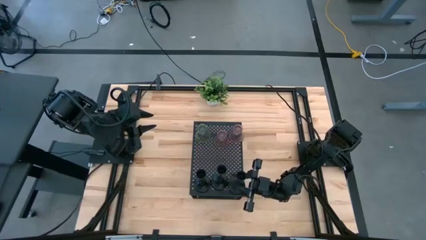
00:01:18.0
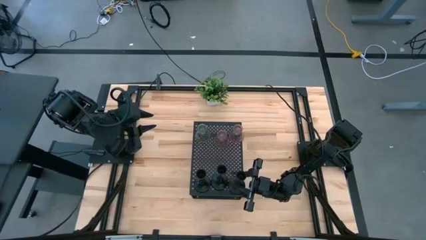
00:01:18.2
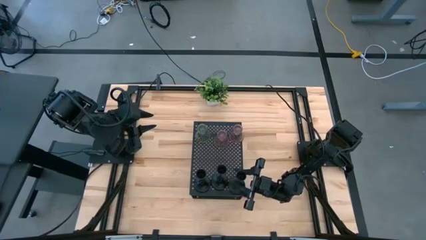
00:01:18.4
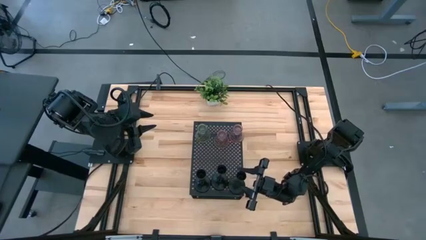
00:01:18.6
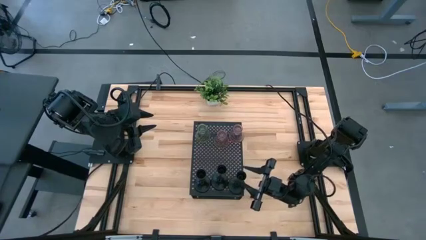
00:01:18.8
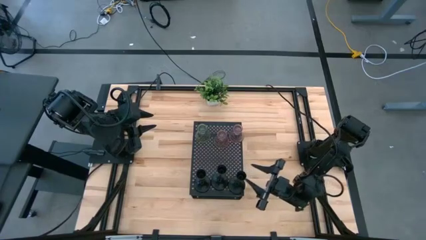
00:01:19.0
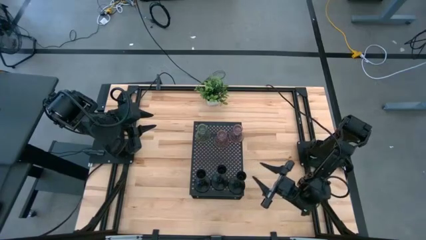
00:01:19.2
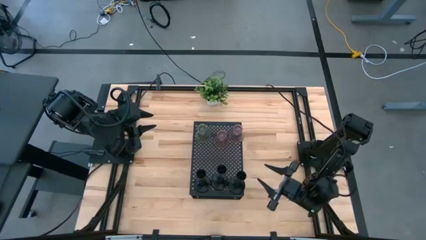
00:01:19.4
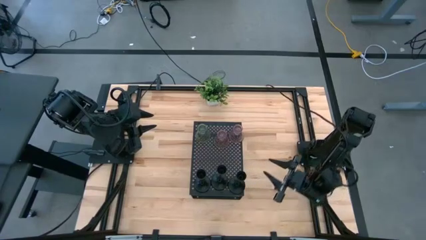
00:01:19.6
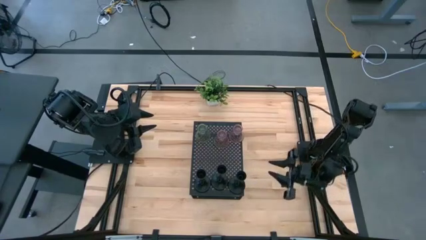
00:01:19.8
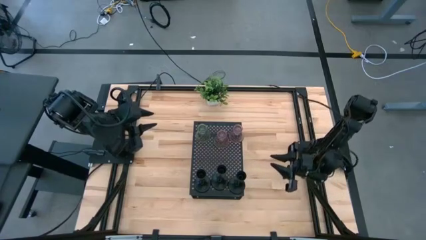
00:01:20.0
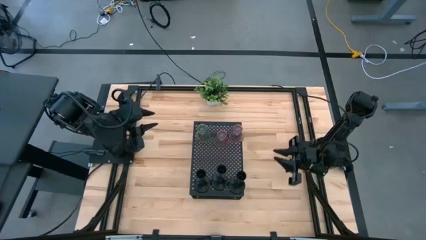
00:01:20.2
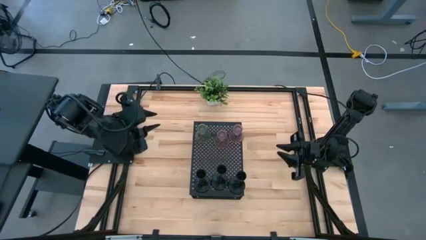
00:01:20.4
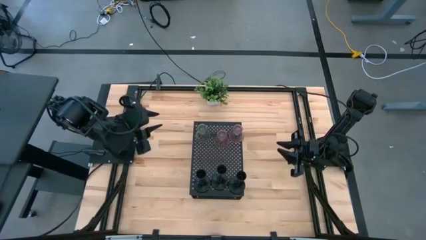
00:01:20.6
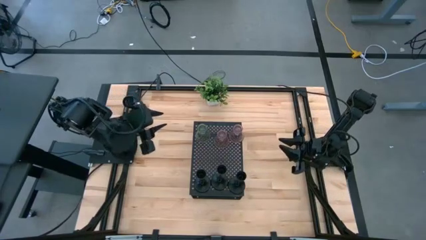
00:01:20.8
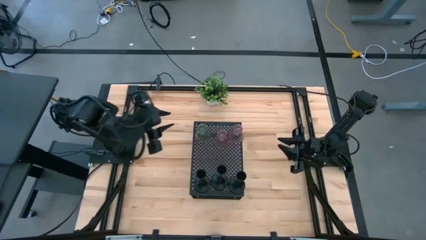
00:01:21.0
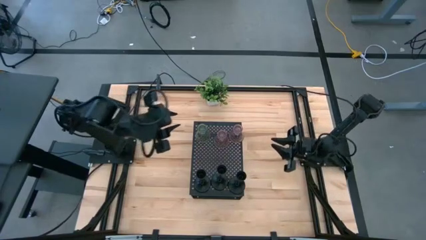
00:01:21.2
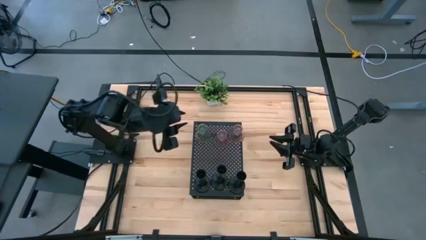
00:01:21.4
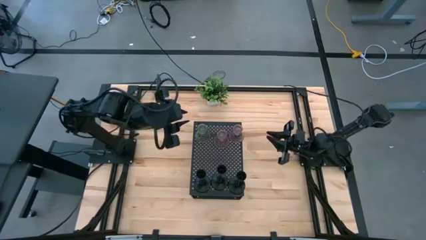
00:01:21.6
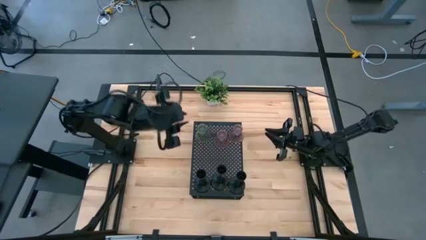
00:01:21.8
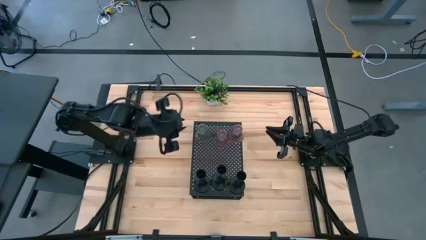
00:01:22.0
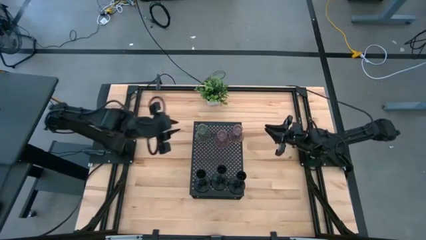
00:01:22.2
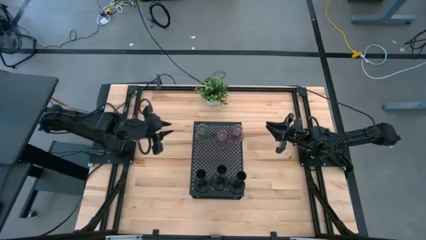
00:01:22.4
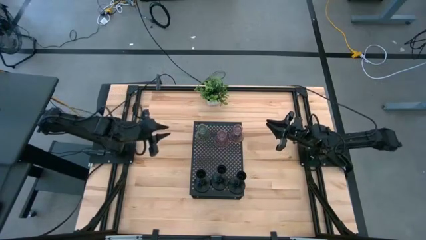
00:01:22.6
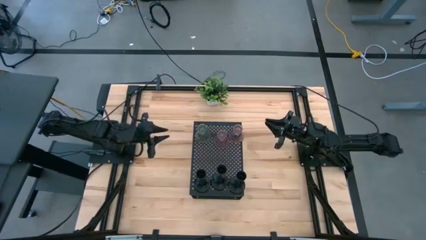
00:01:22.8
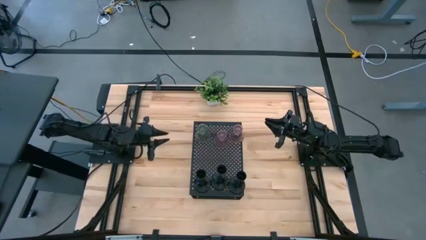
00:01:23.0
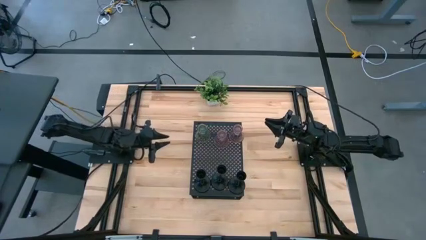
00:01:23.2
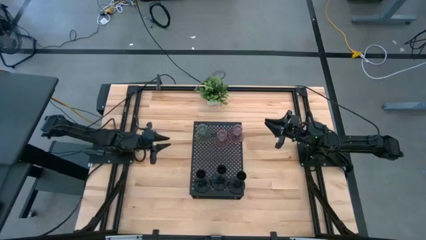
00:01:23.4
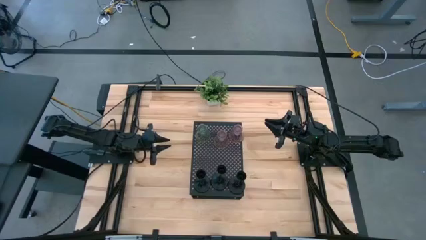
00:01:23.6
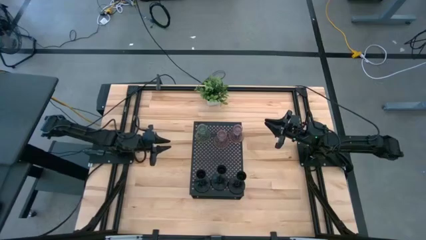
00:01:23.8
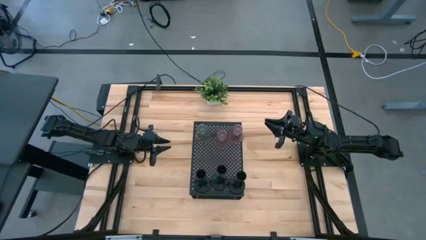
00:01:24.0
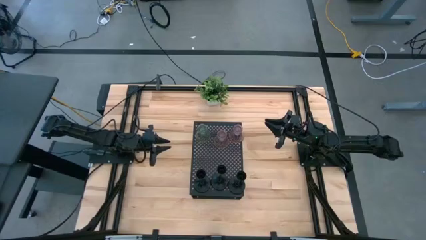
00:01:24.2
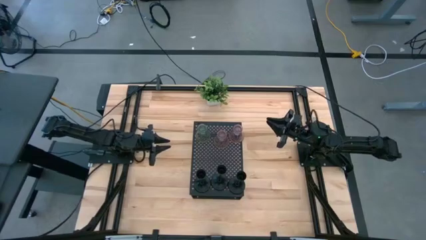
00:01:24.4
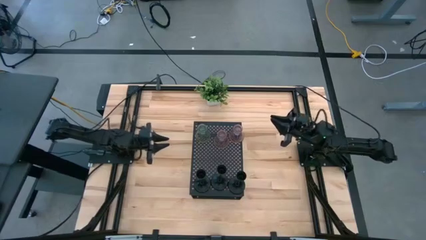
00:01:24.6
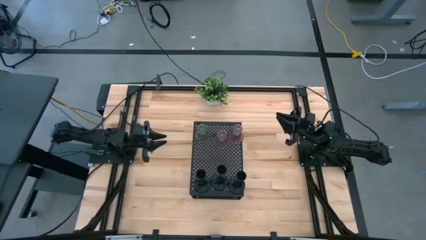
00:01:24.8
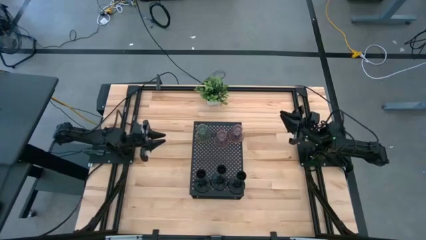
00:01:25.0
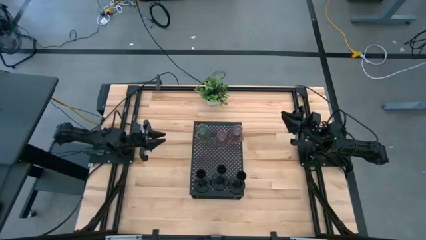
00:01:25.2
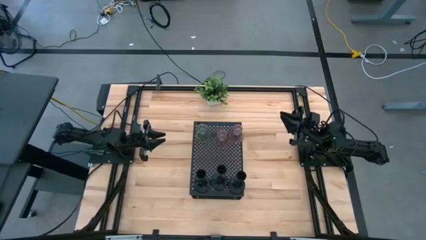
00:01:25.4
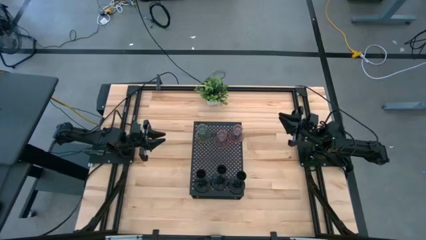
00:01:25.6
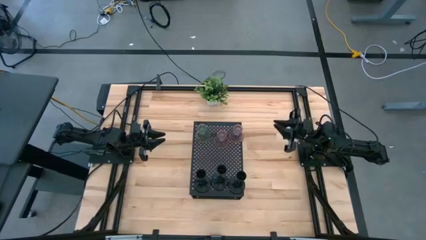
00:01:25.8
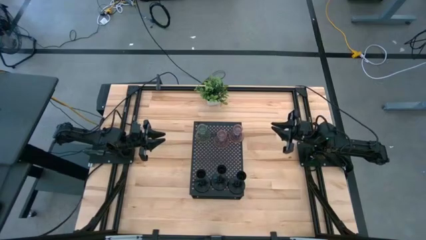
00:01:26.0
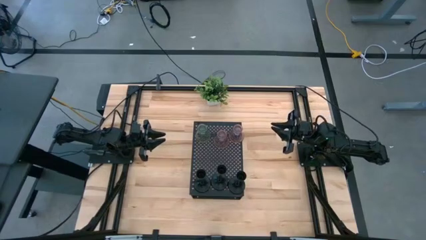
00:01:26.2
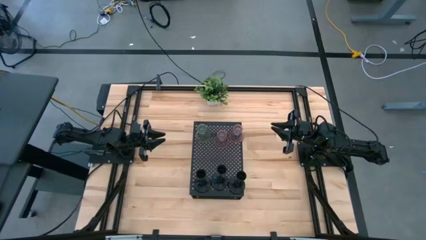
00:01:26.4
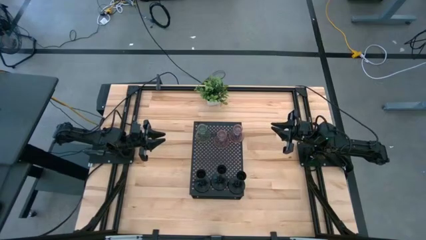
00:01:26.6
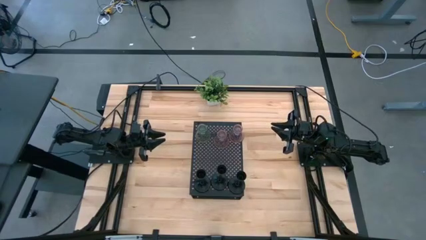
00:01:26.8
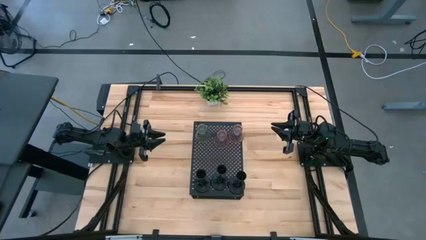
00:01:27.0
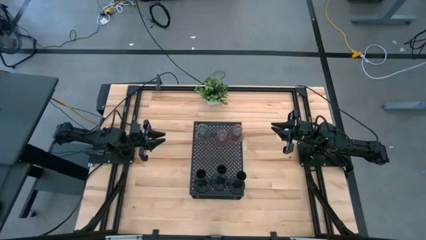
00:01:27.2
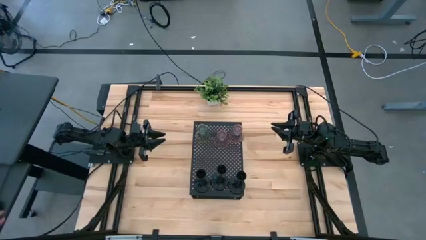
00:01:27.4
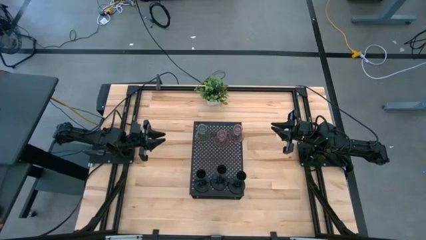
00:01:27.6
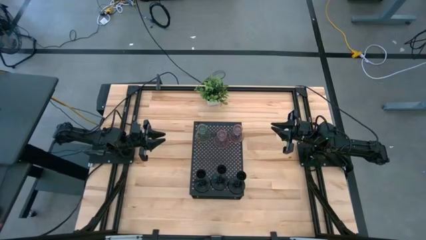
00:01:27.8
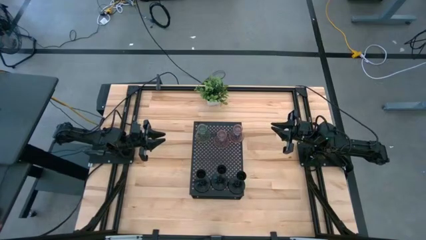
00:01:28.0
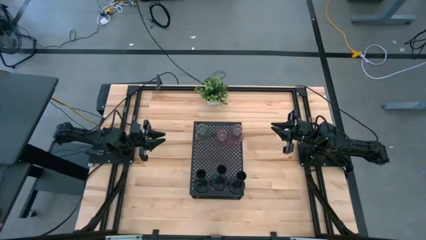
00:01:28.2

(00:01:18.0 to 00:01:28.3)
Task: Pick & Place candle stick holders
Return to Home Position

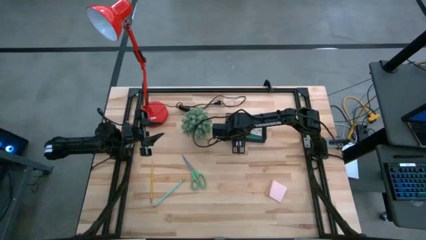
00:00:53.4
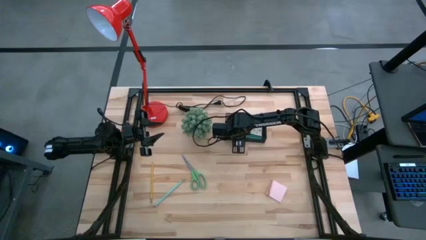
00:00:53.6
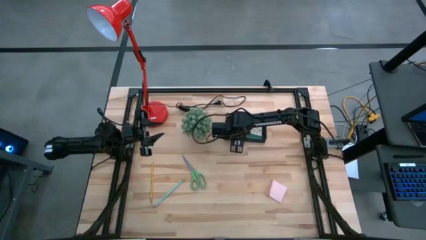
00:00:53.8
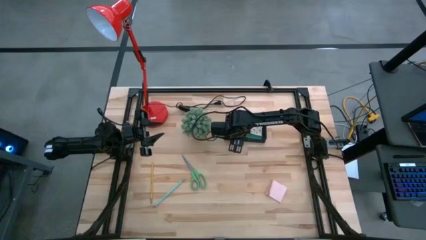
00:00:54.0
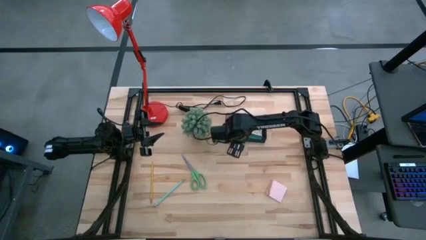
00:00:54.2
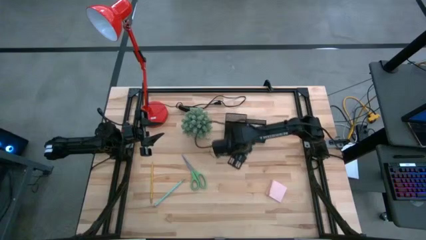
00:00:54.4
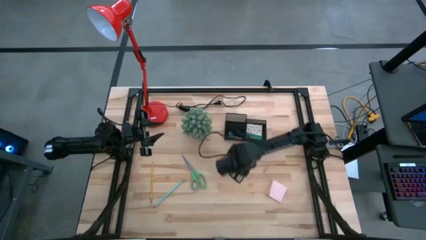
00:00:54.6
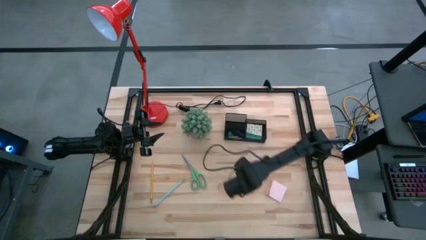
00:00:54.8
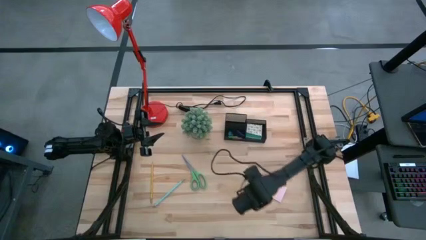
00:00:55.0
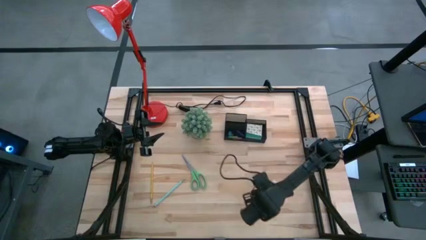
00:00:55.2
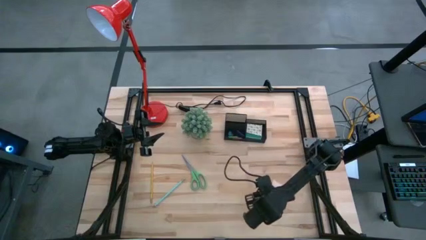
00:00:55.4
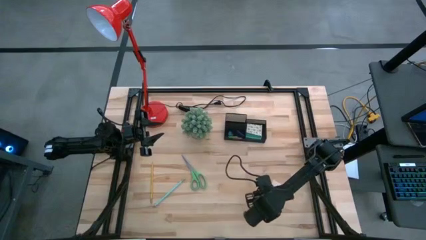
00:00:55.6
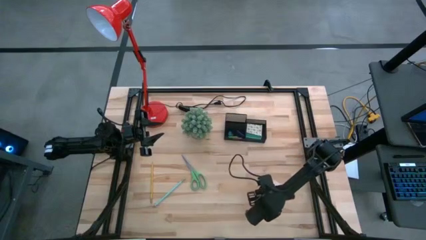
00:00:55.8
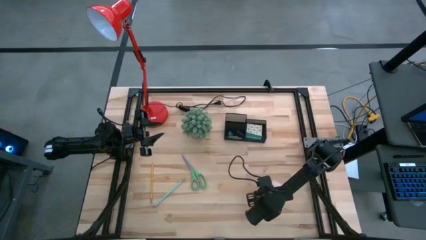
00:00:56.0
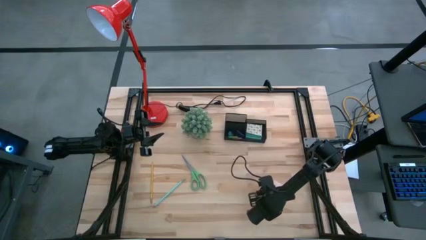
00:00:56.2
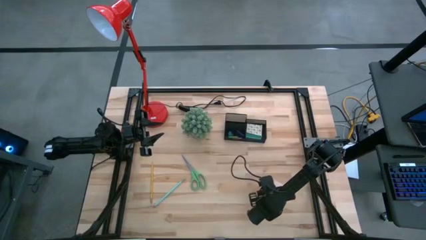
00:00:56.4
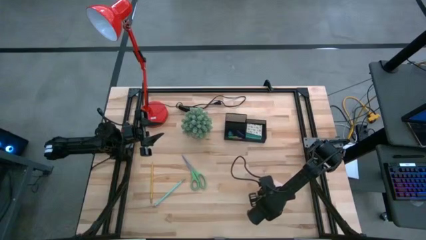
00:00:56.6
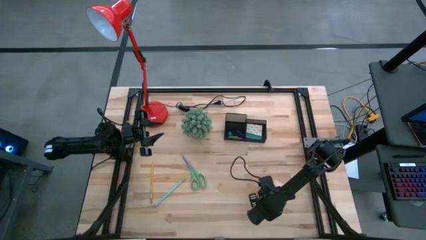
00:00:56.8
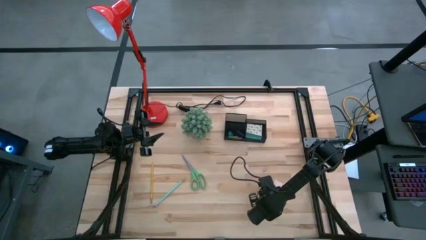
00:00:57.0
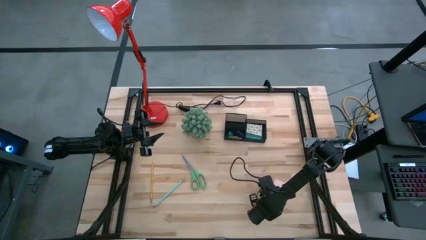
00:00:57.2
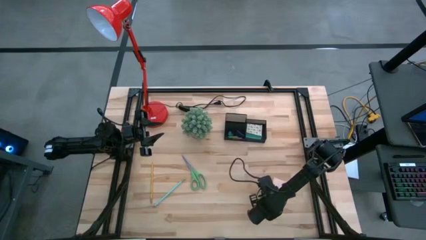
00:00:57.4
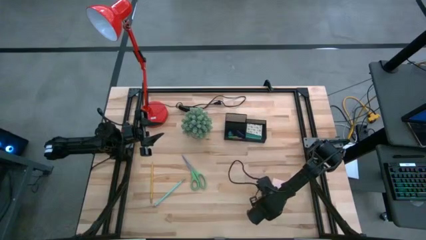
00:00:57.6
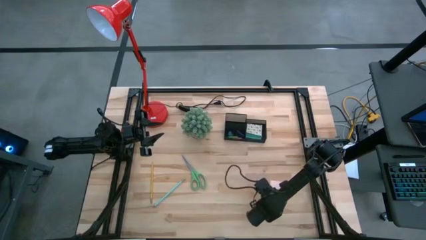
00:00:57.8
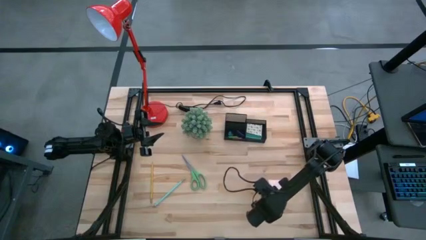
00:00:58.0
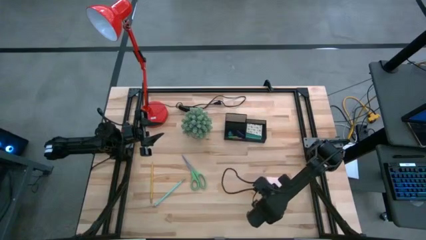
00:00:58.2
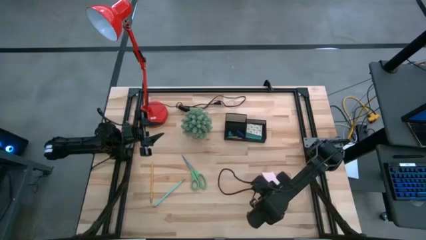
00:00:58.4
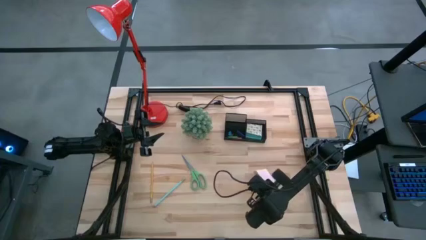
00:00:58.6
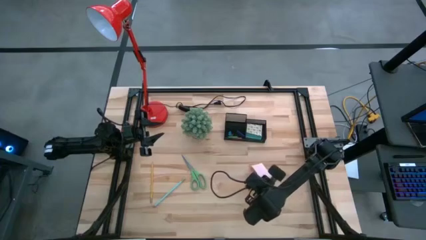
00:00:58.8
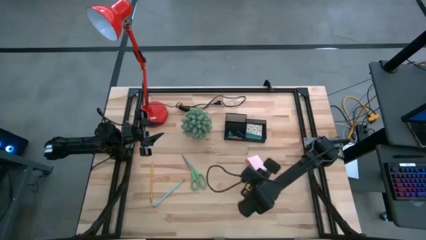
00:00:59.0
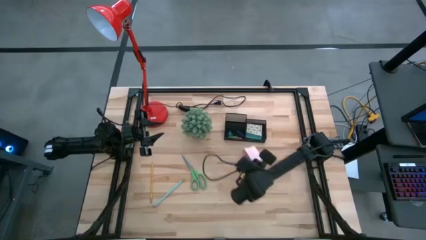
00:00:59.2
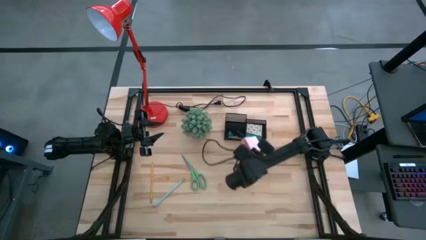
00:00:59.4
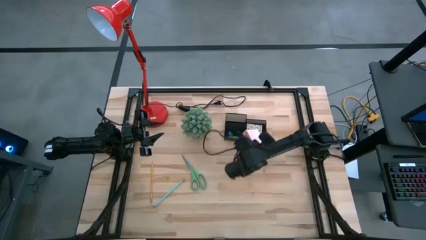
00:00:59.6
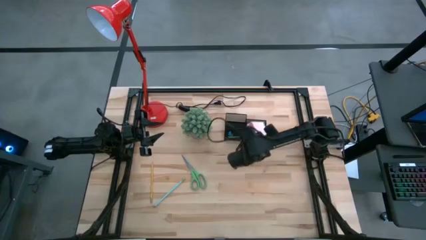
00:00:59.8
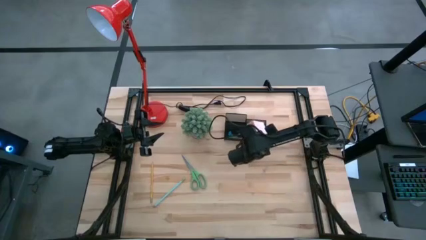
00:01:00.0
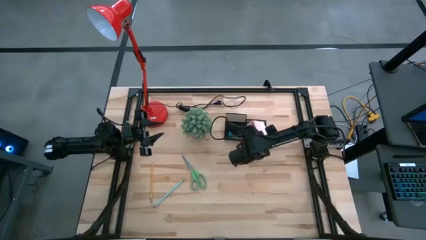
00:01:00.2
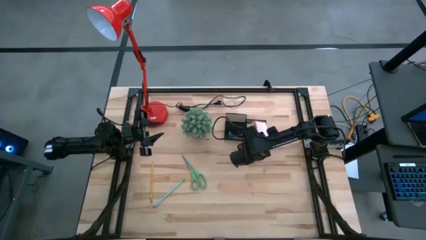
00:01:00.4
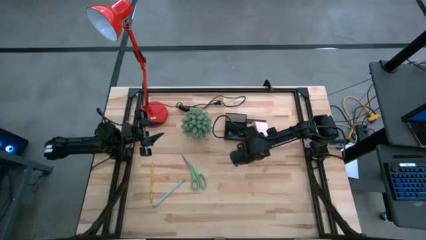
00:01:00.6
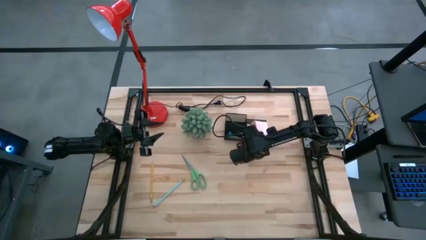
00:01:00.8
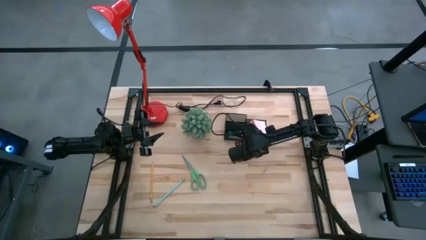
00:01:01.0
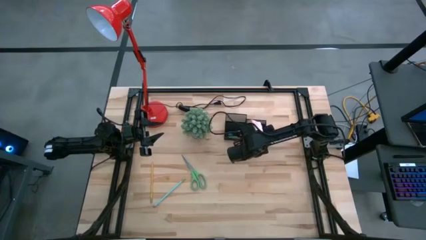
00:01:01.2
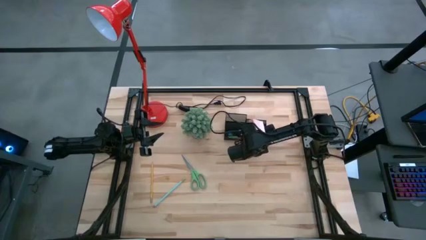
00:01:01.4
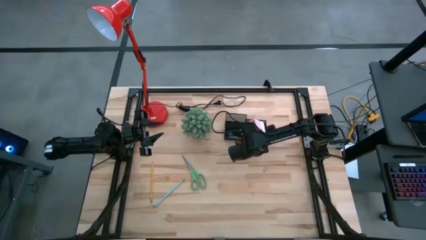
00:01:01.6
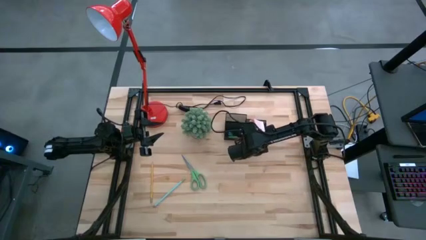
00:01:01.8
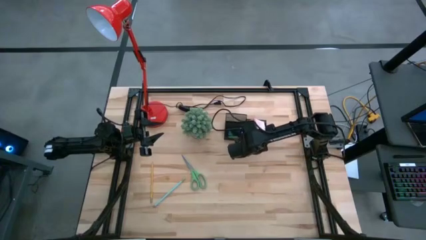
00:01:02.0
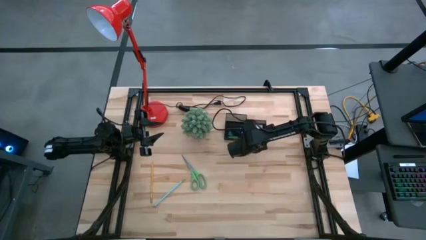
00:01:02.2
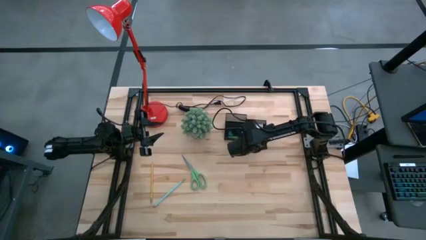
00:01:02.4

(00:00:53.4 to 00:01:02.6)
Task: Pick and place office supplies into organizer
Put the pink sticky notes into the black desk organizer
